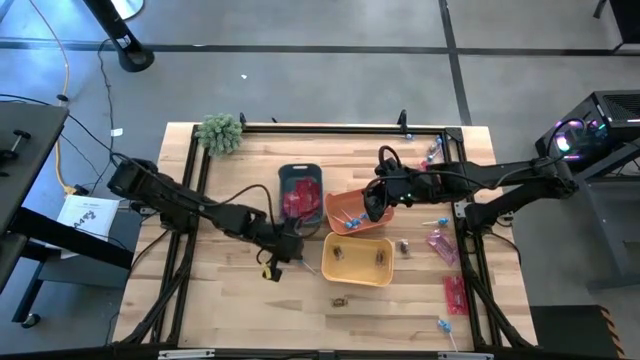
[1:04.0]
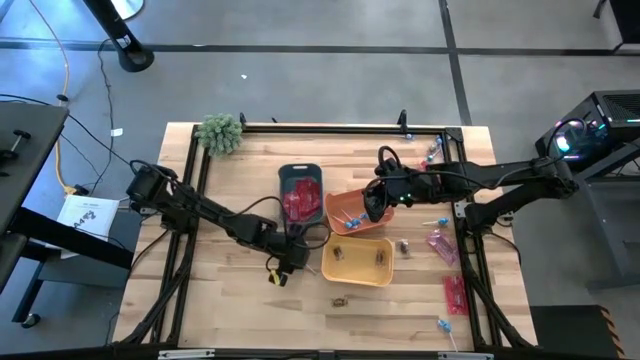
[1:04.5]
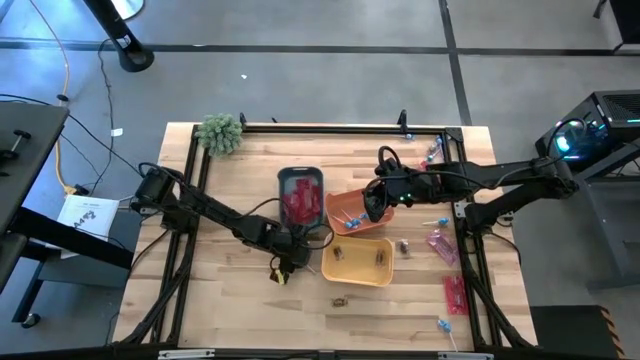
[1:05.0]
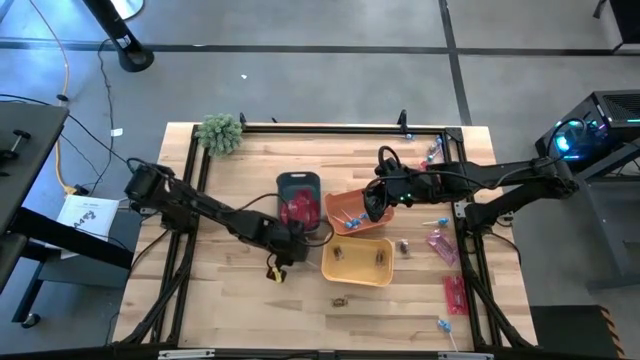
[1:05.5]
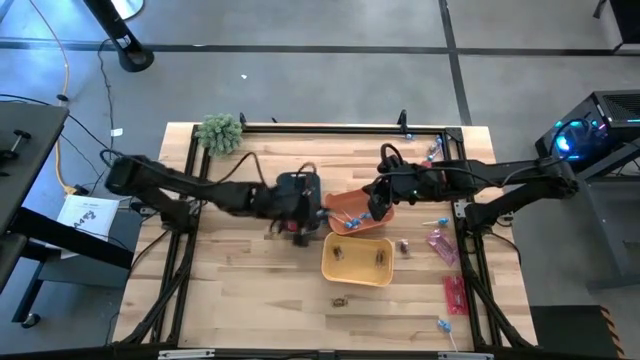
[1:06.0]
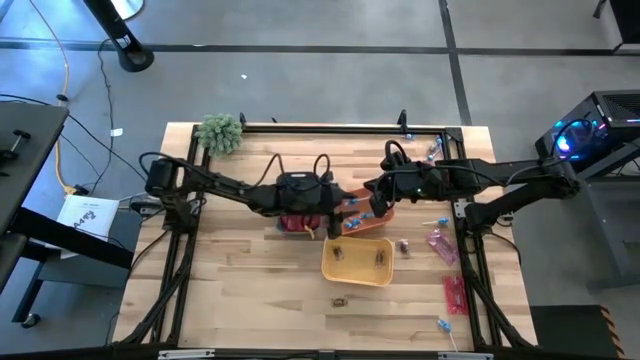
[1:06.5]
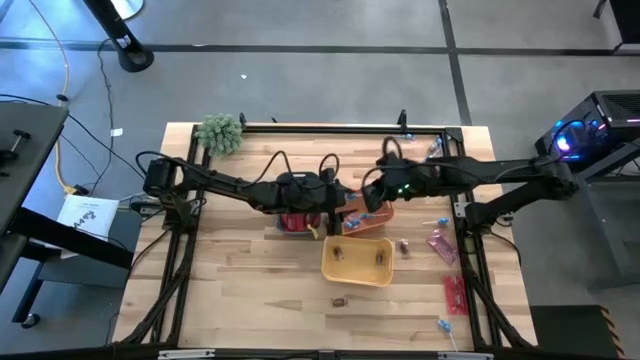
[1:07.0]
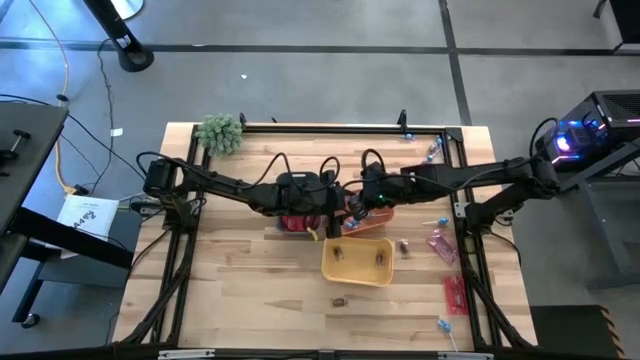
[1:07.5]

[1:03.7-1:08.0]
Task: Sort candy
Put the blue lollipop into the orange bin

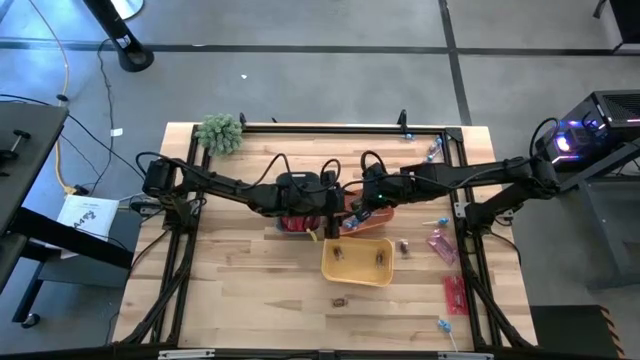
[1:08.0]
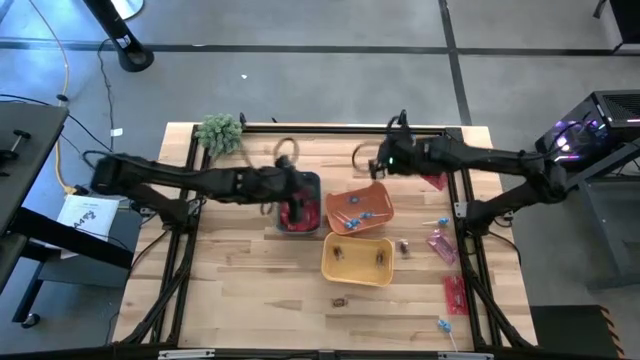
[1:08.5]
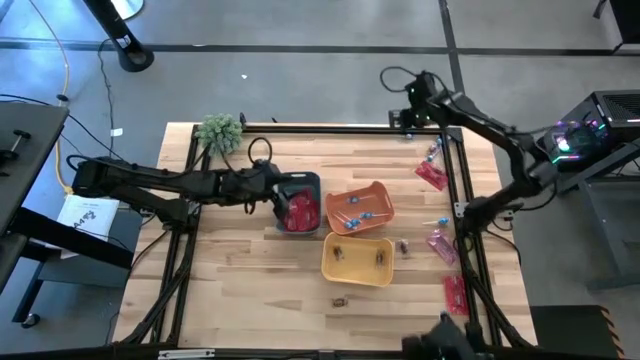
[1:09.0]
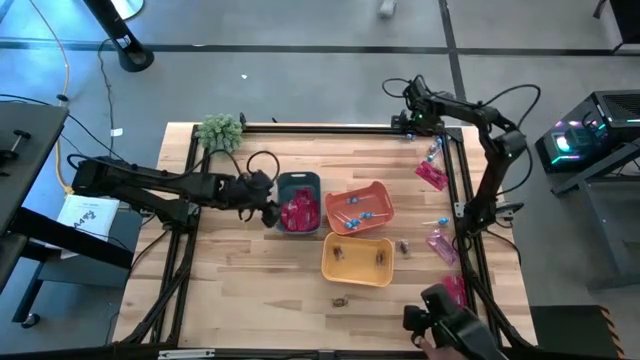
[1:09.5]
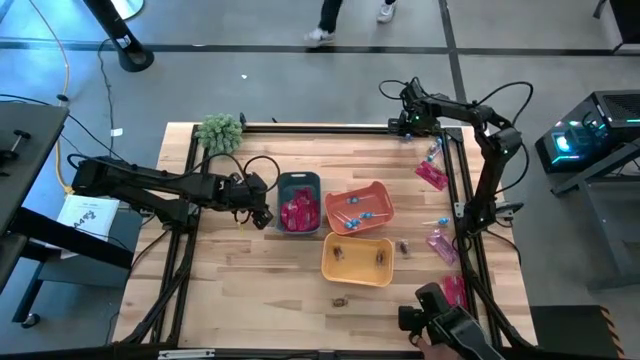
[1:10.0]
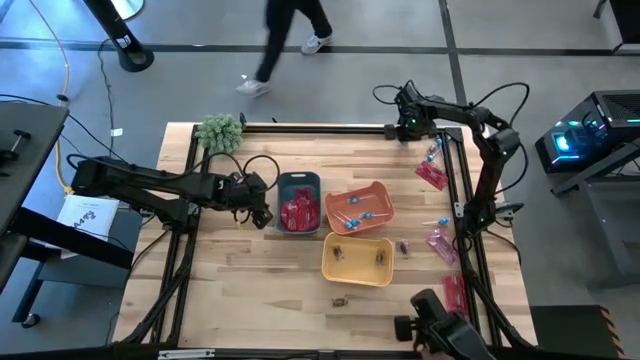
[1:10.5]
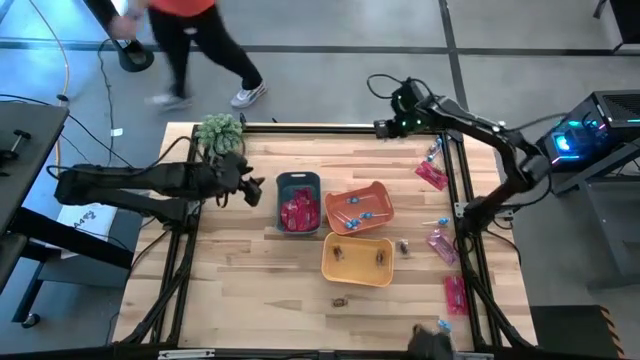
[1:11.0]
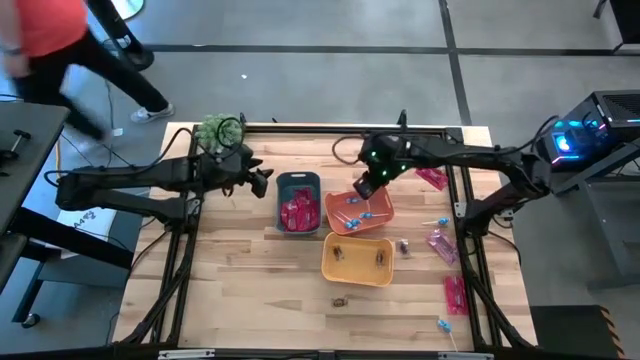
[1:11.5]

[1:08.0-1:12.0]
Put the blue lollipop into the orange bin

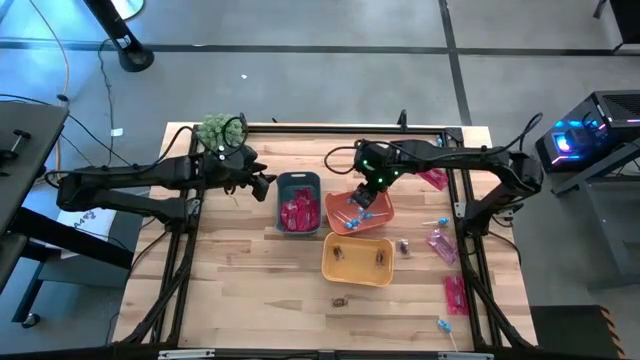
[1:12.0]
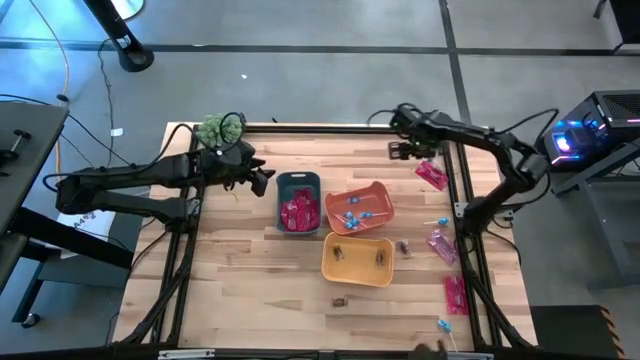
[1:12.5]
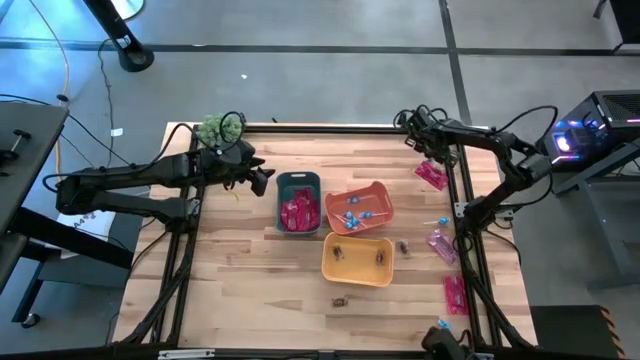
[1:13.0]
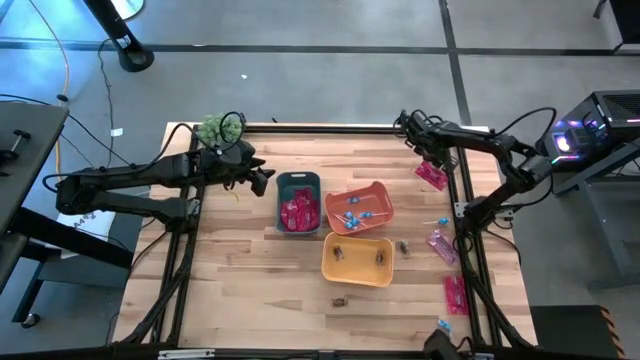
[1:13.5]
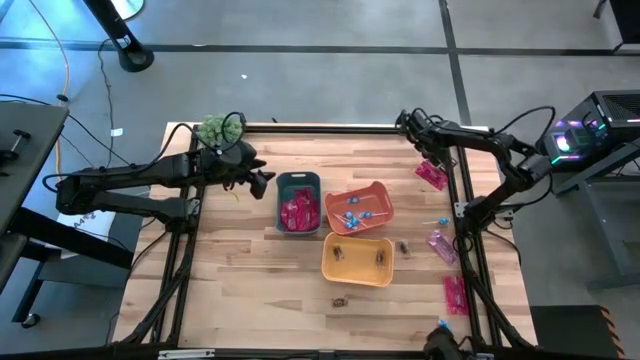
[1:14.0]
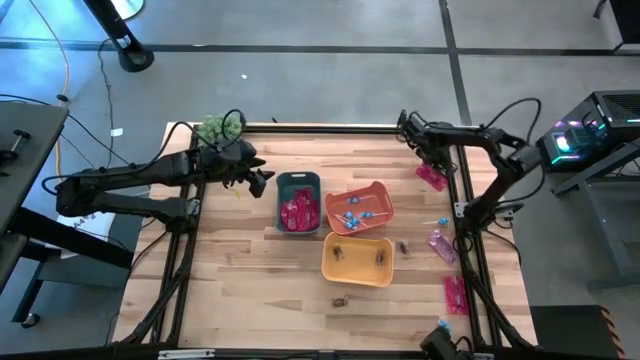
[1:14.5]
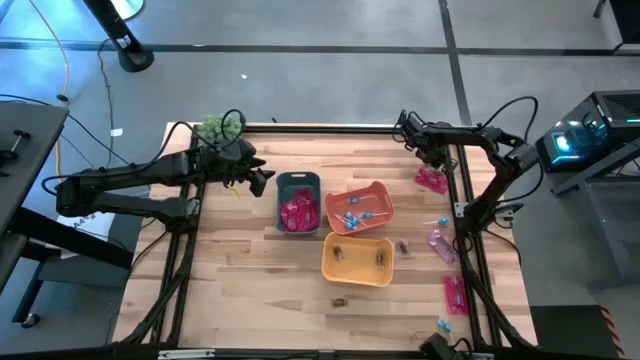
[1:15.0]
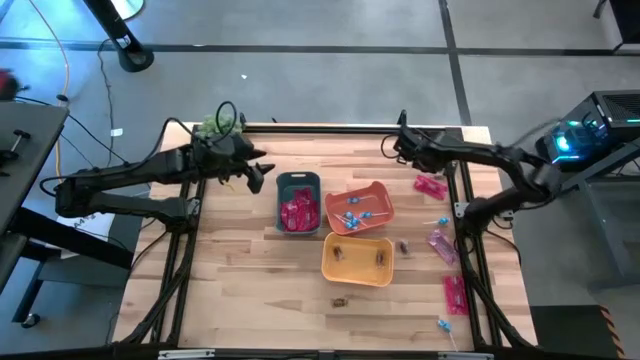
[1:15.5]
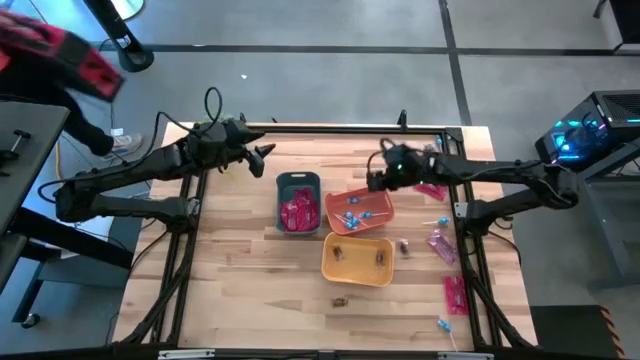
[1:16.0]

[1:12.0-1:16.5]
Put the blue lollipop into the orange bin

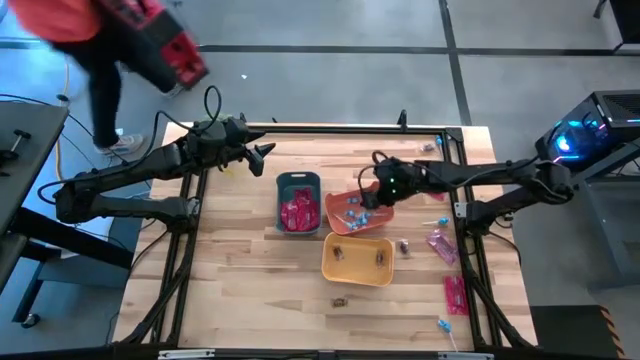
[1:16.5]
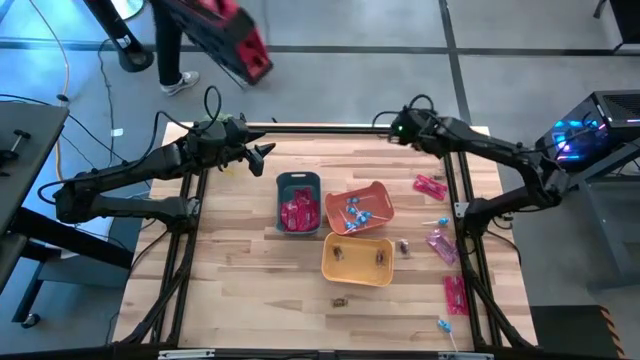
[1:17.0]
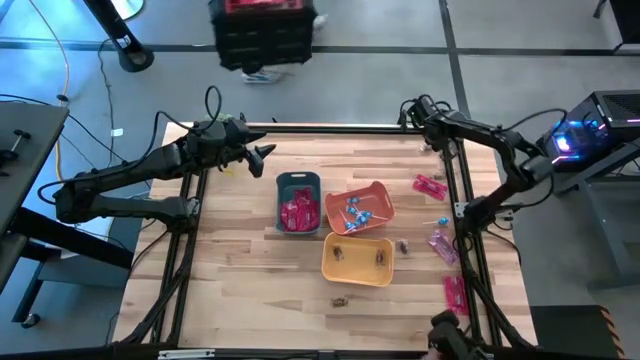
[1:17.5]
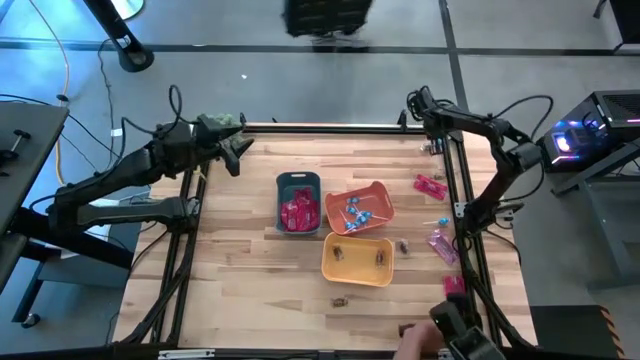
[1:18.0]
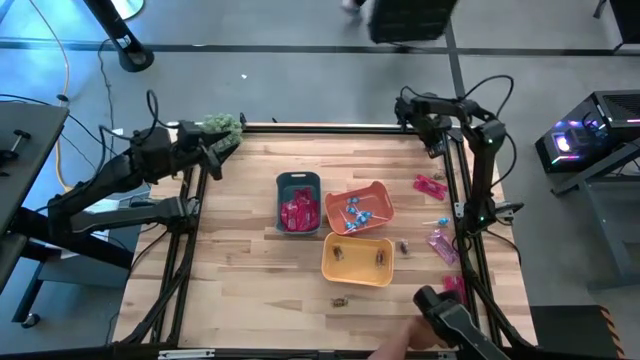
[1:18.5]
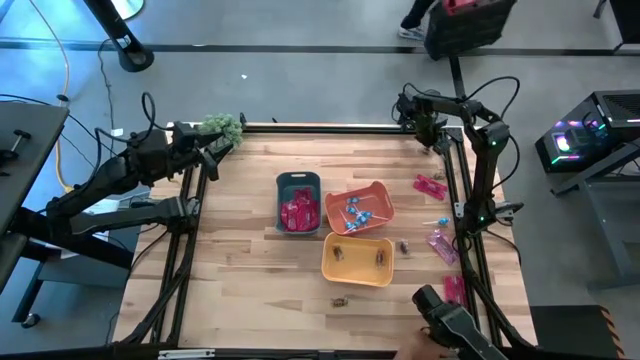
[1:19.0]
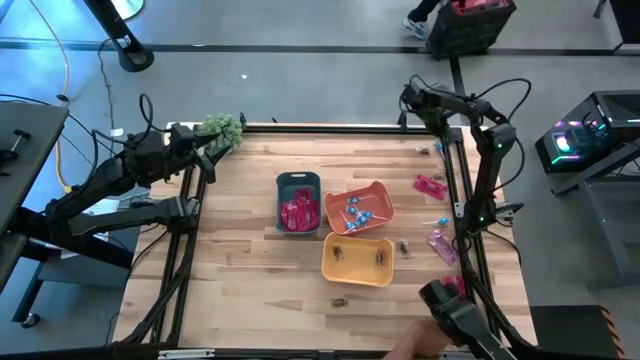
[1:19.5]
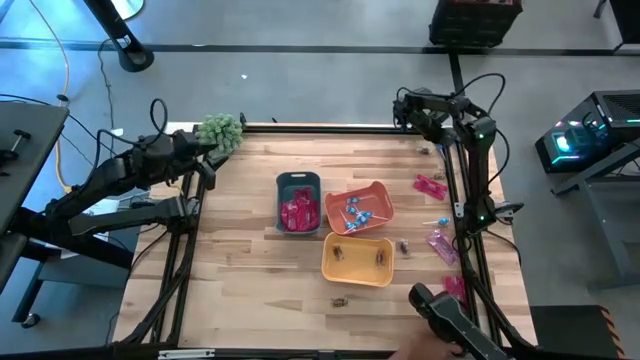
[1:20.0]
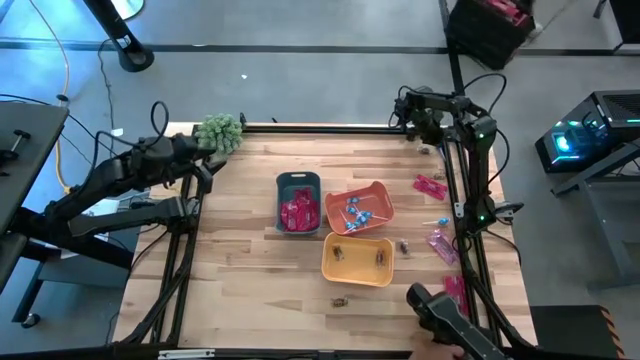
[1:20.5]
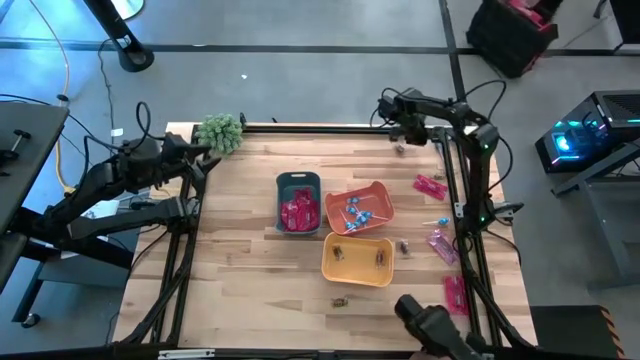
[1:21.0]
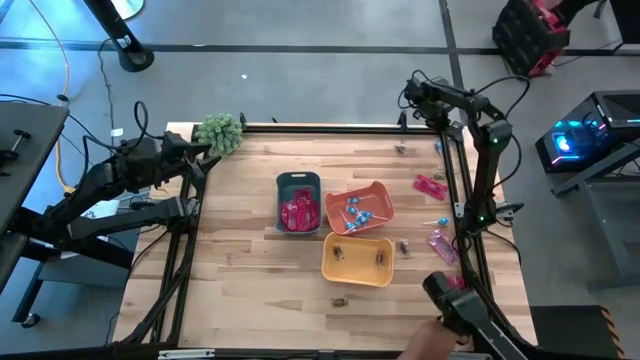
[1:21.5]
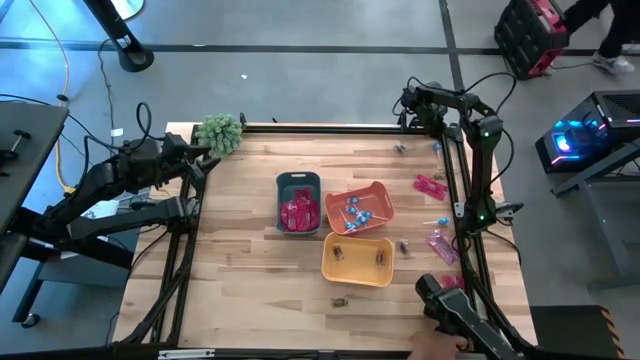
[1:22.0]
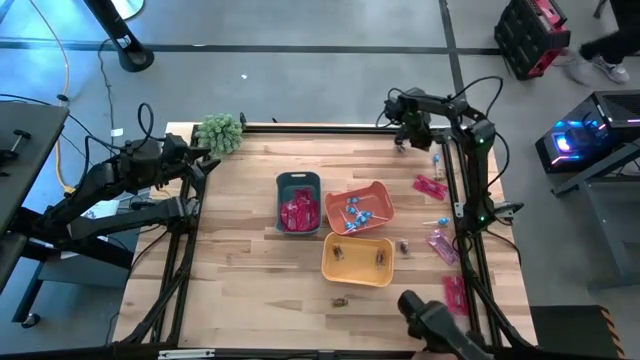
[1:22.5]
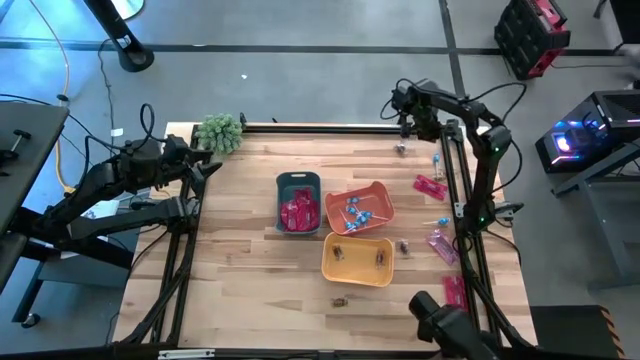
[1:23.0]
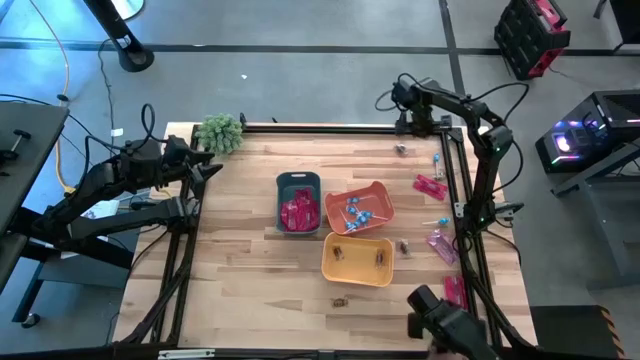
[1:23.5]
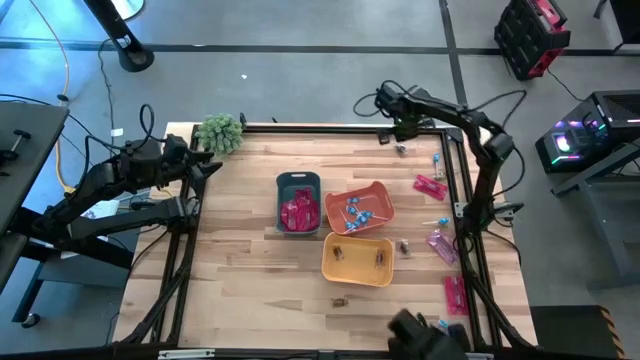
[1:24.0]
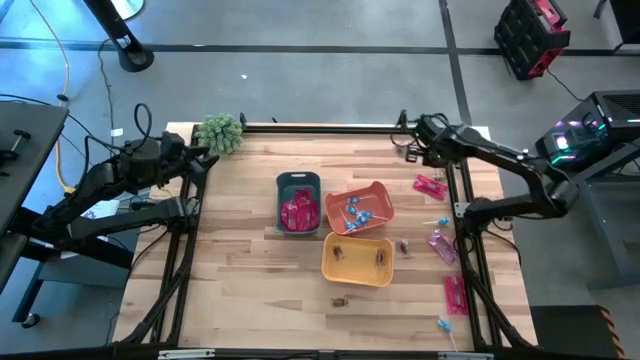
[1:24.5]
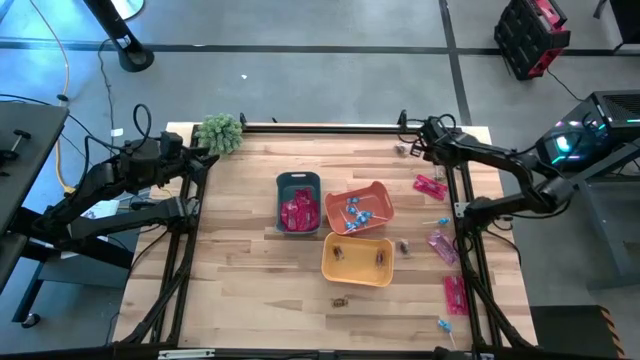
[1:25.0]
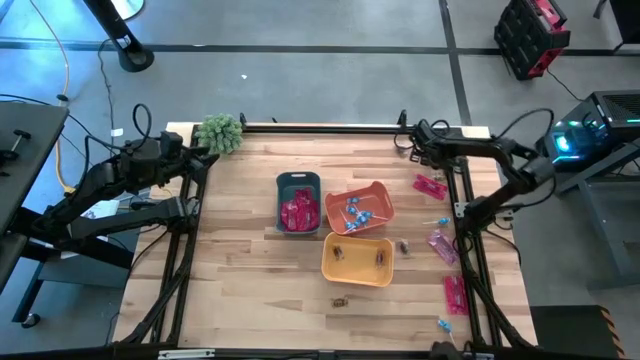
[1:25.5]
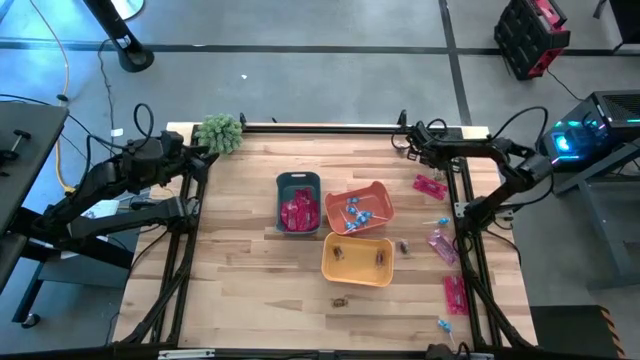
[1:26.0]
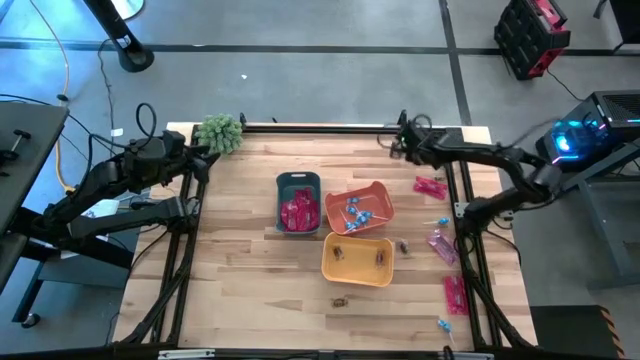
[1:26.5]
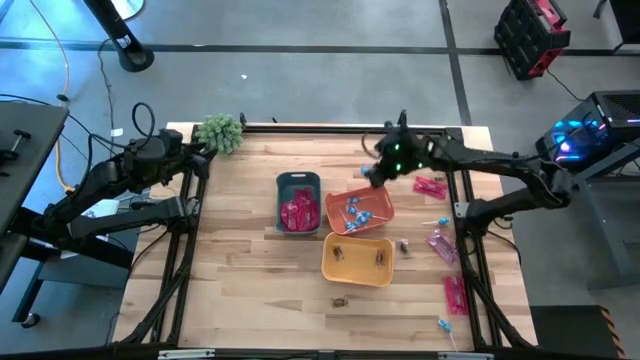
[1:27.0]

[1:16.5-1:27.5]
Put the blue lollipop into the orange bin
